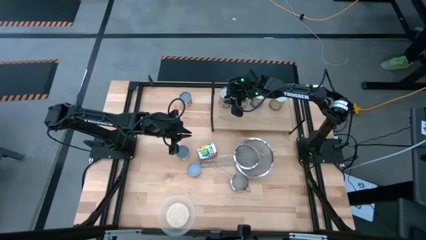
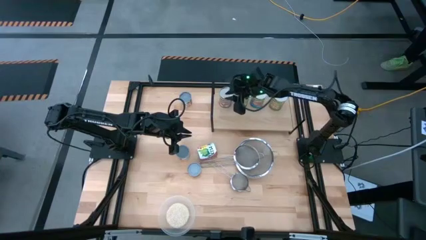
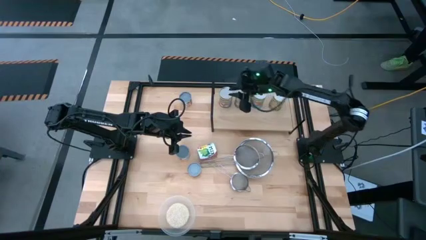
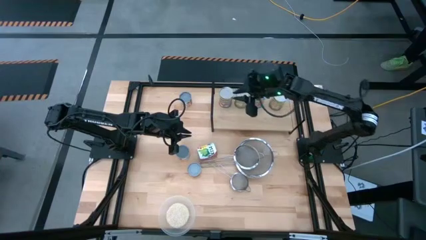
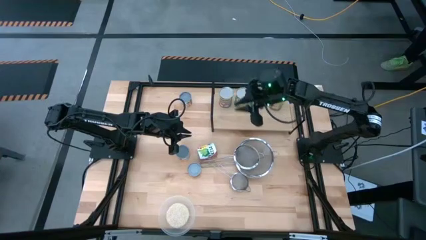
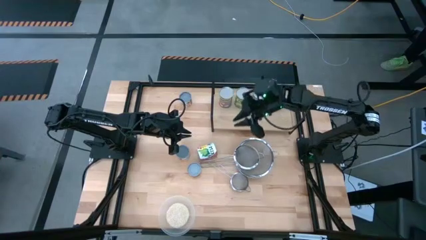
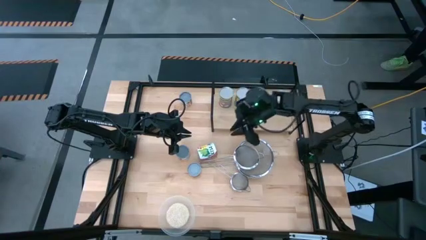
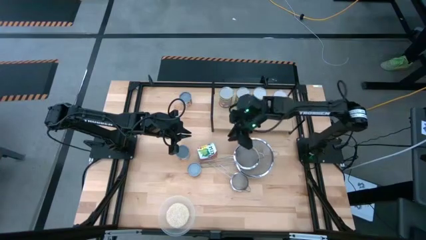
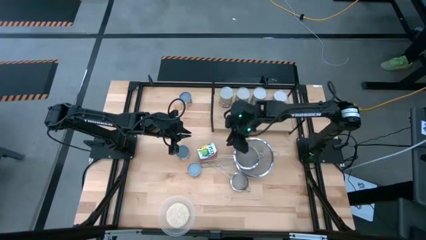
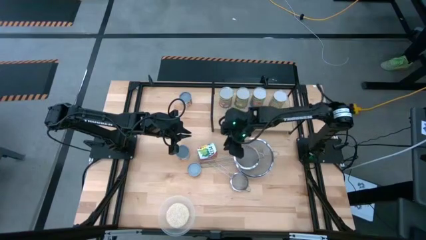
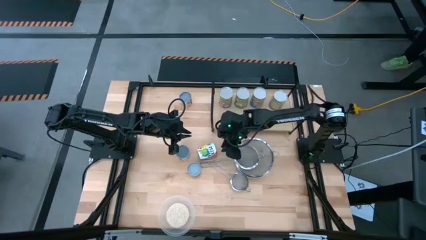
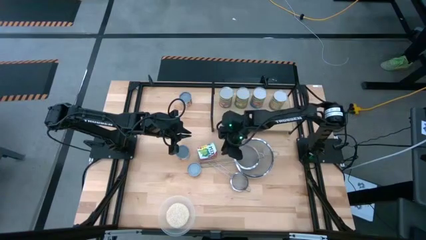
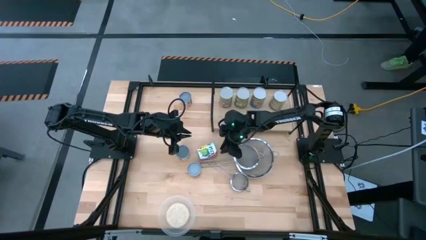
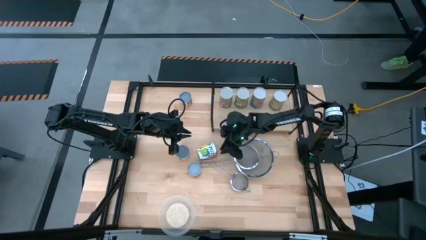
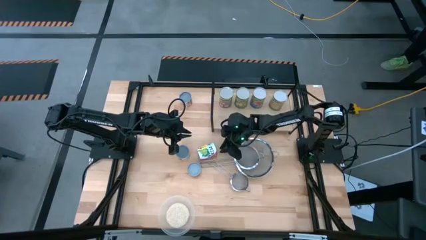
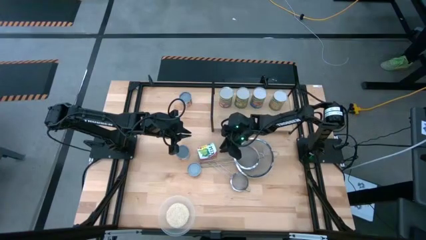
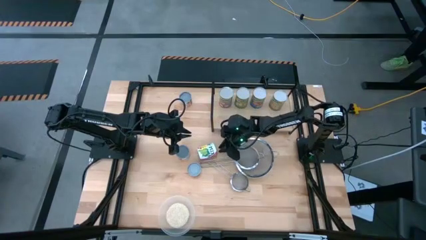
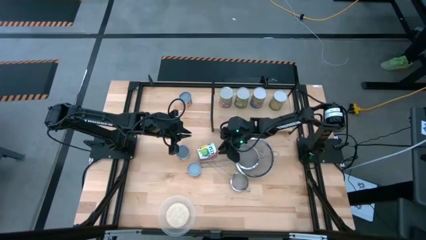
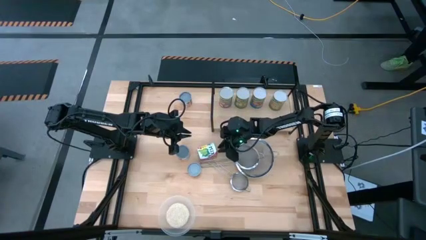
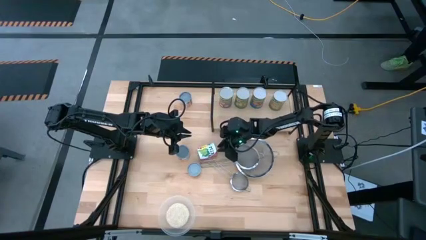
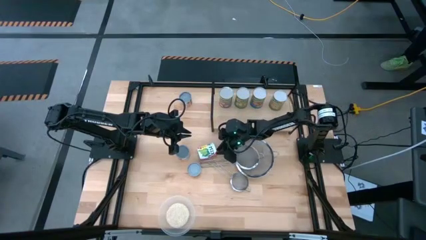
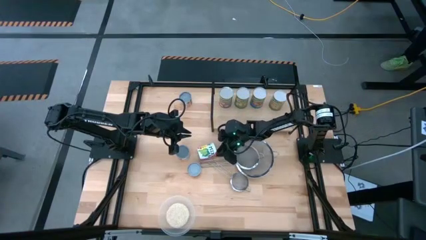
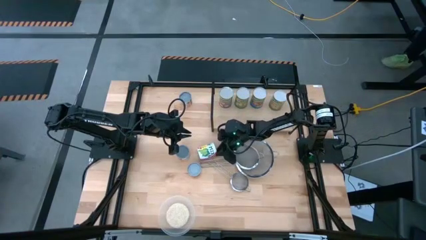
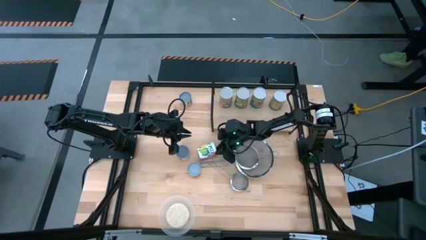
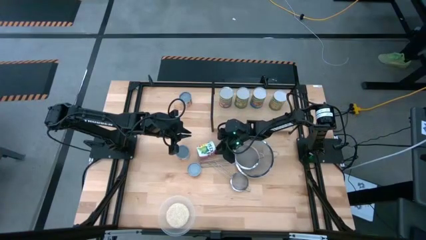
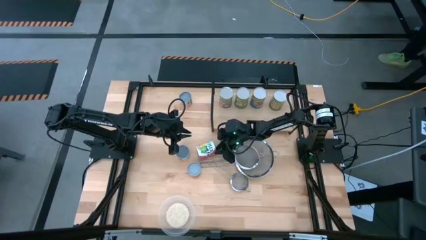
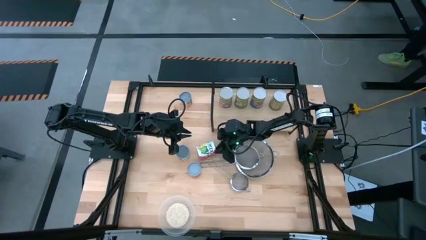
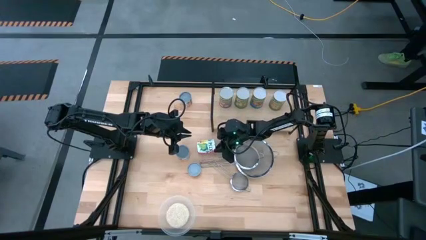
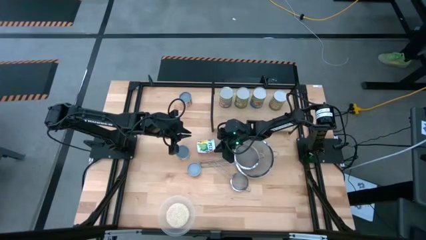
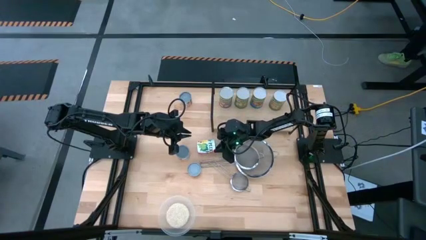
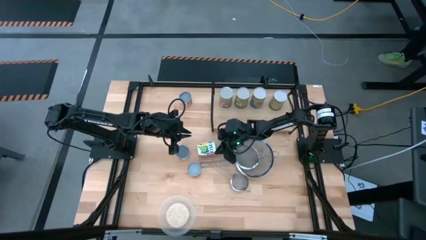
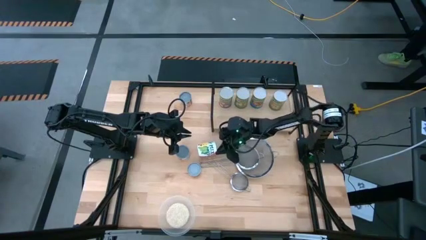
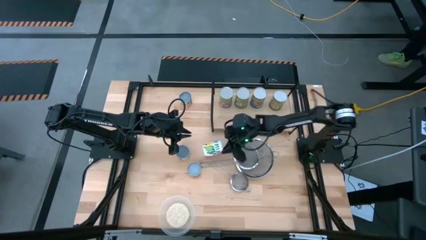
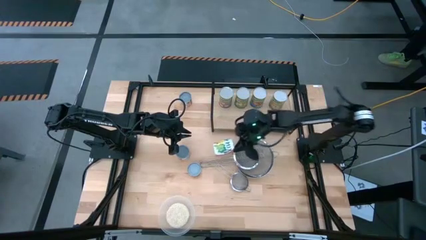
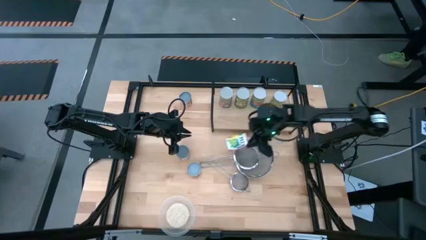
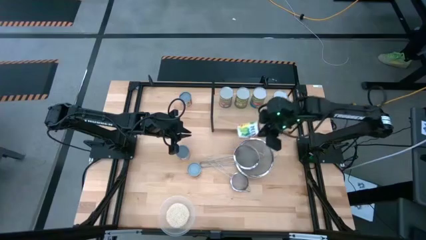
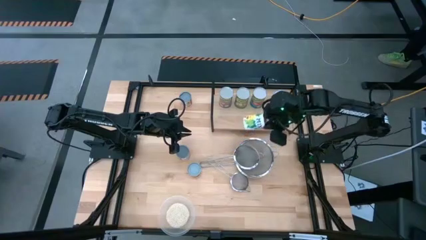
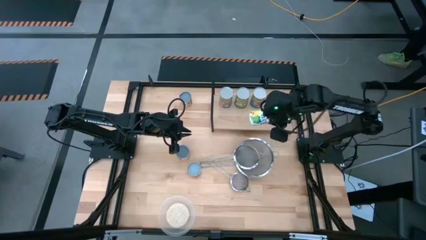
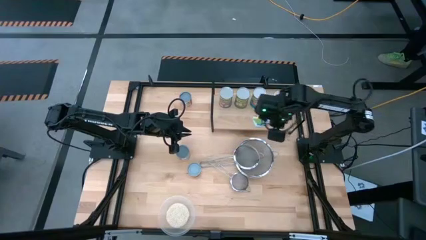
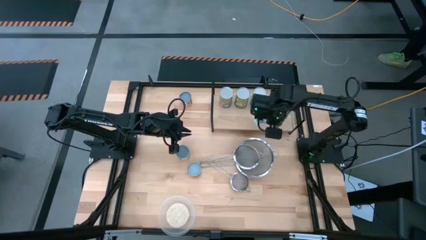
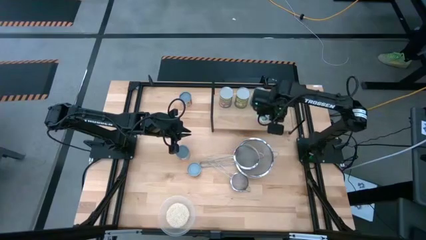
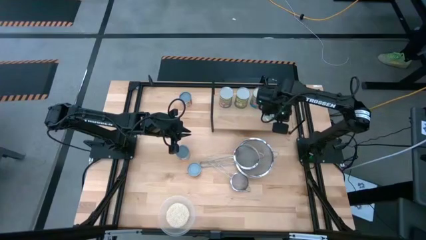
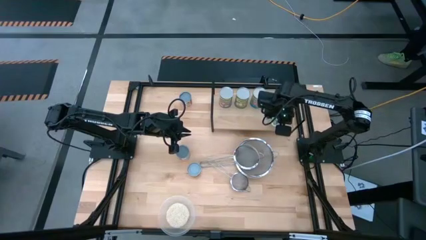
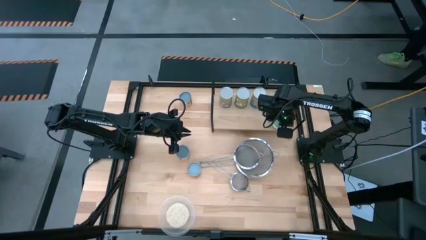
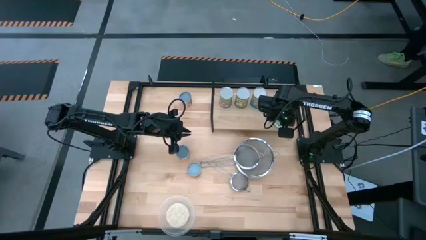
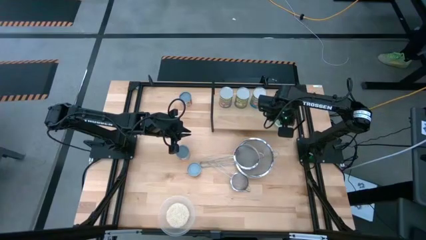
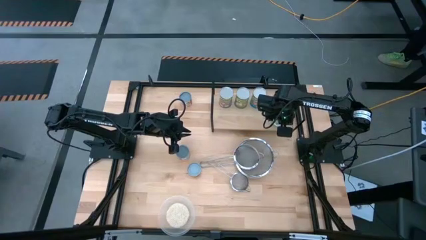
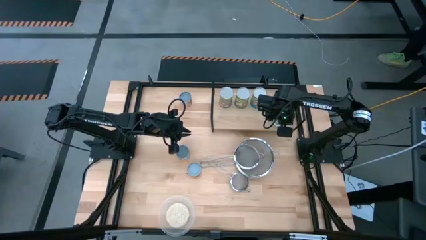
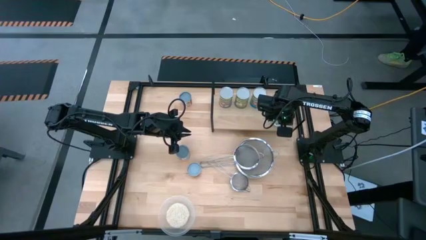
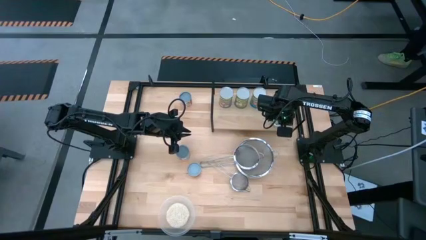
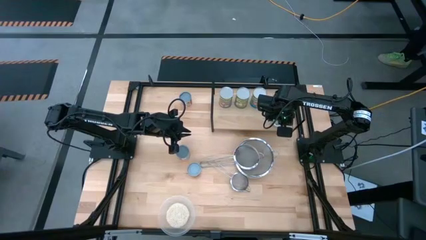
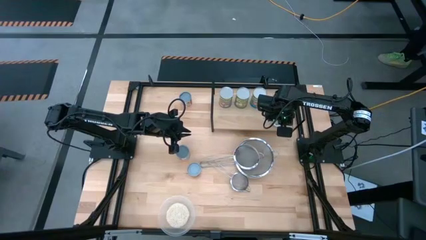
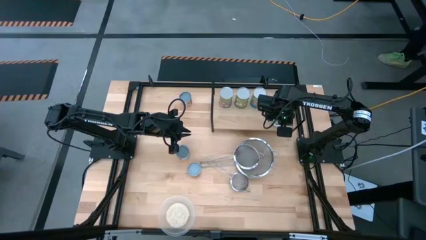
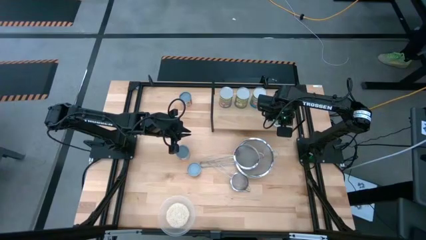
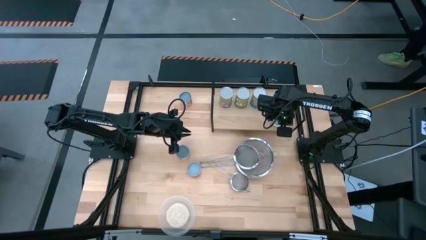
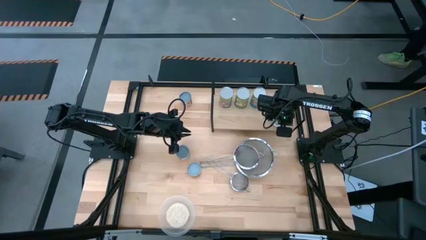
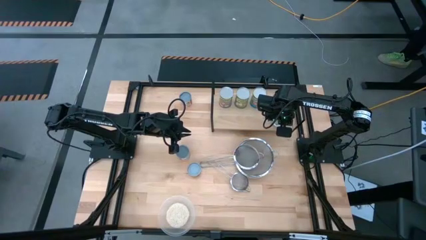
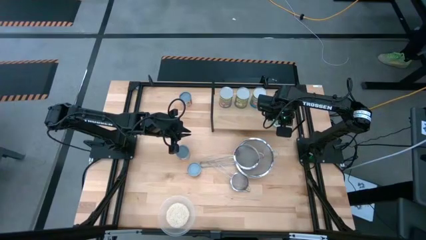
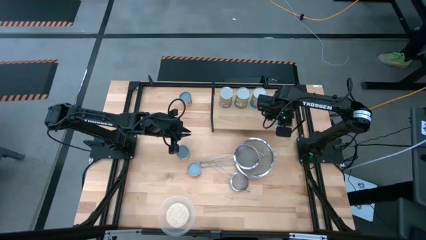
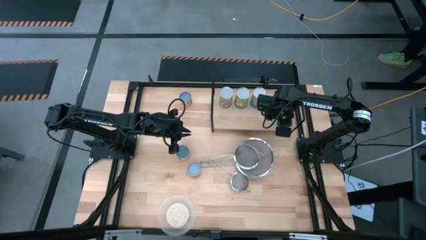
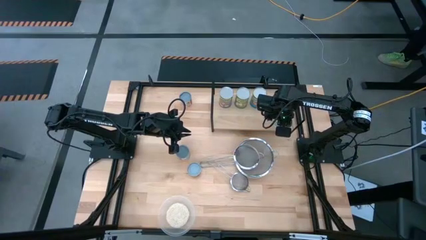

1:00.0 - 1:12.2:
Task: Pick and place cans onto a shelf
Put the canned mixed fruit on the shelf
